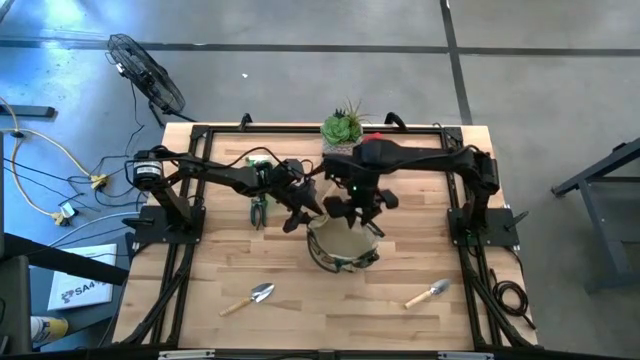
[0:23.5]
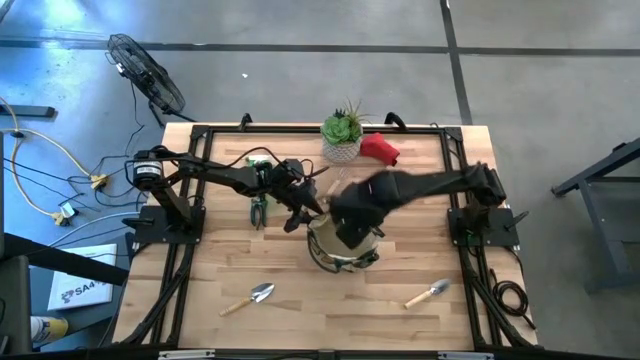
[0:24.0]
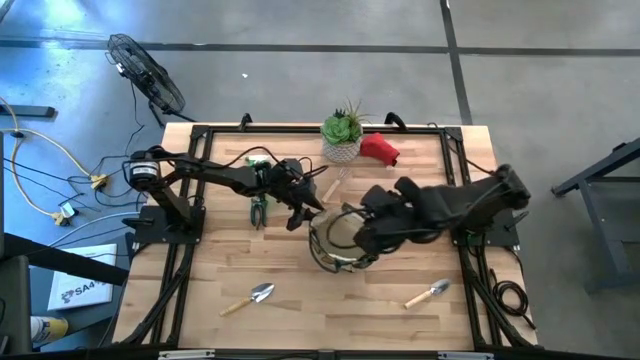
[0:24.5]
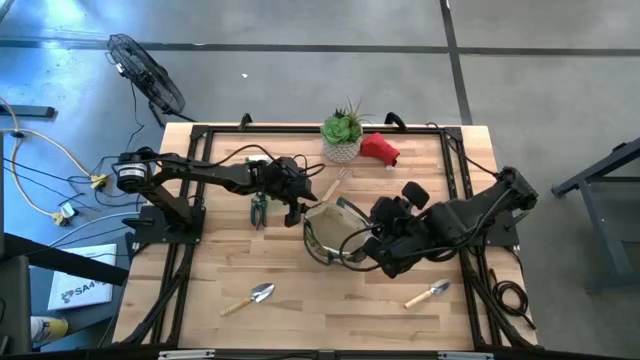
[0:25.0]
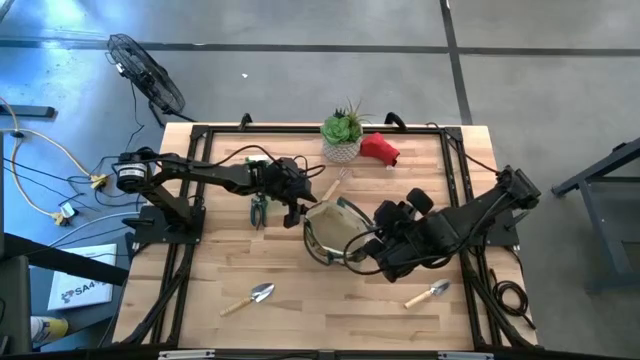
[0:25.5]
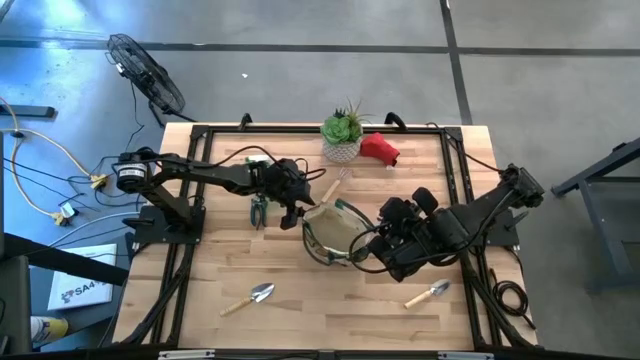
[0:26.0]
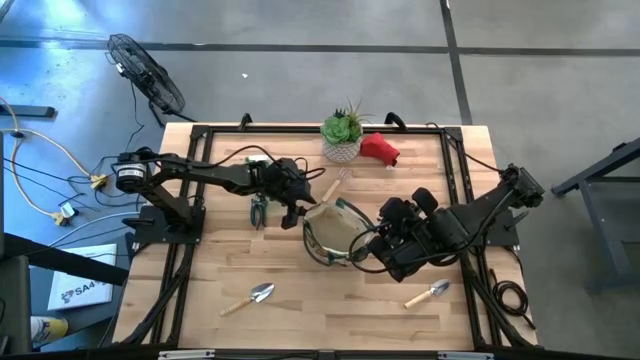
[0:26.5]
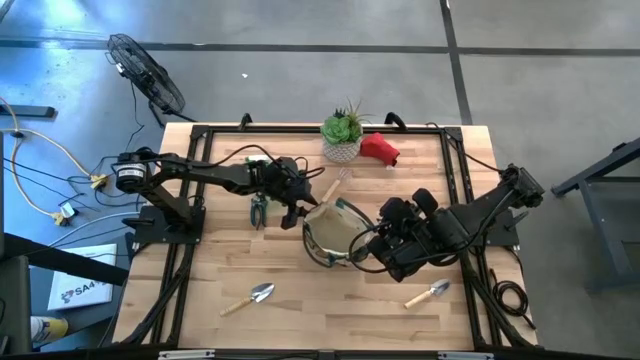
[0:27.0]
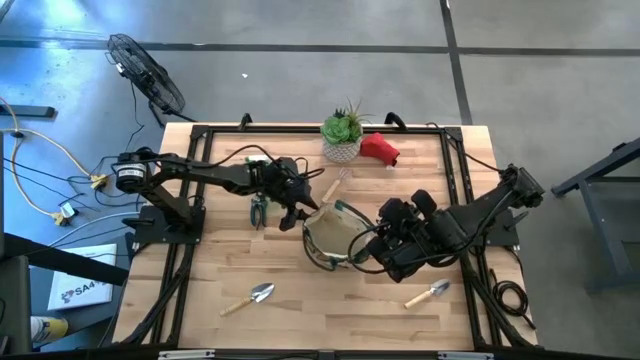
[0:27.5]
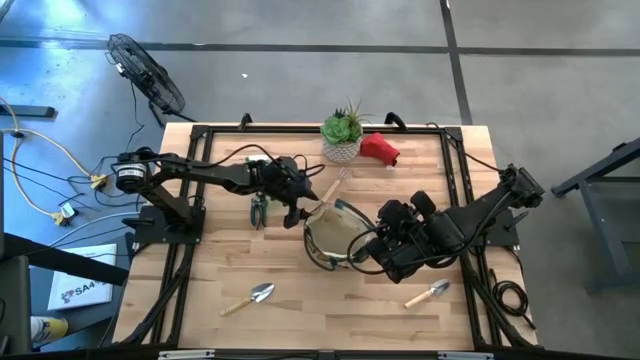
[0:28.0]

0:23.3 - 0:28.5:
Task: Pick & Place Garden tools in Gardening bag
Adjust the gardening bag

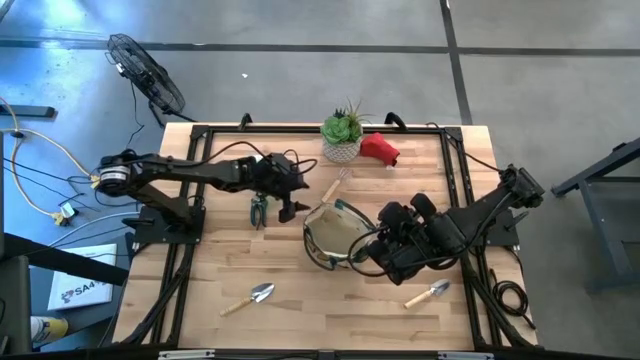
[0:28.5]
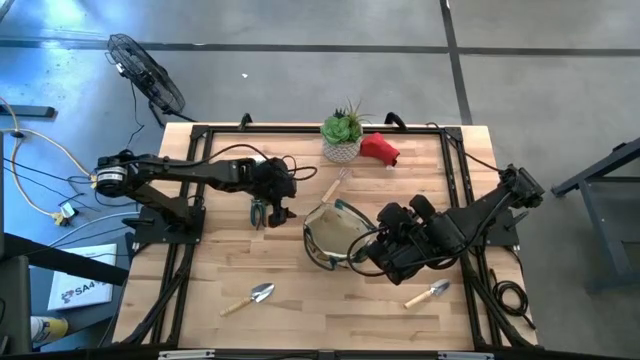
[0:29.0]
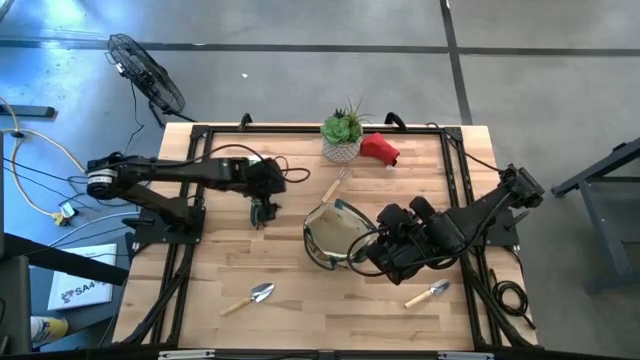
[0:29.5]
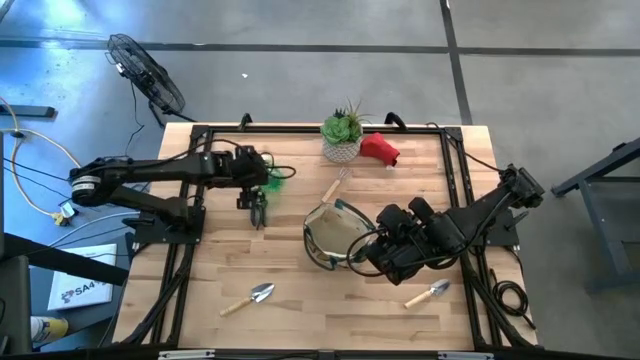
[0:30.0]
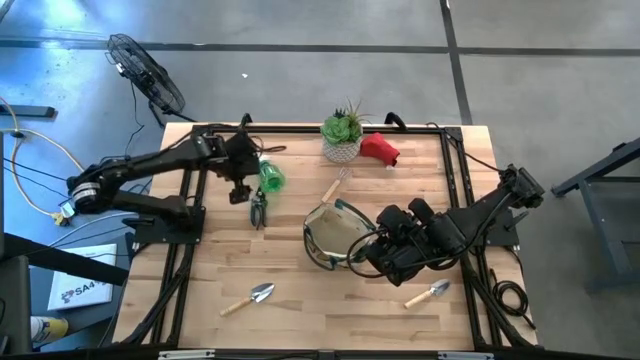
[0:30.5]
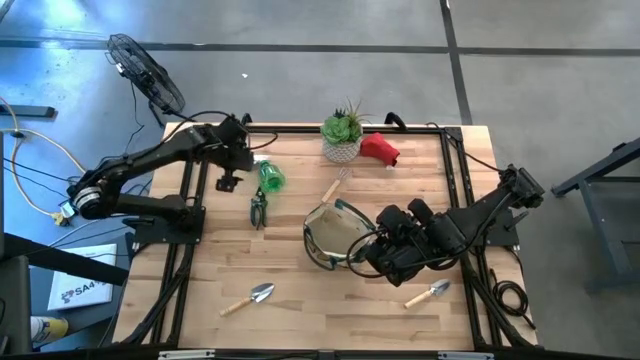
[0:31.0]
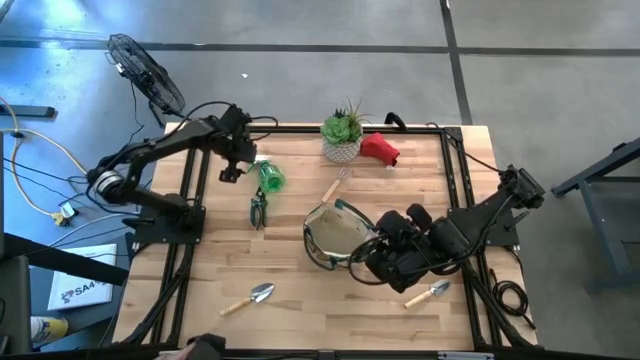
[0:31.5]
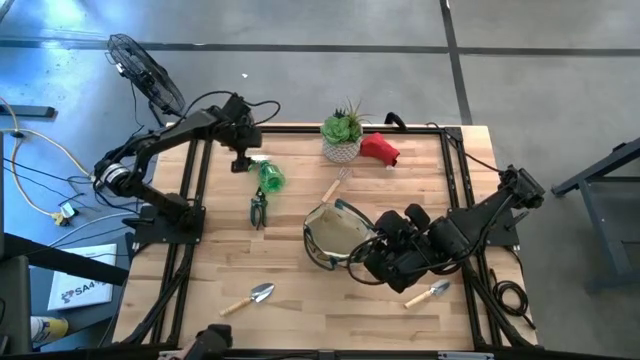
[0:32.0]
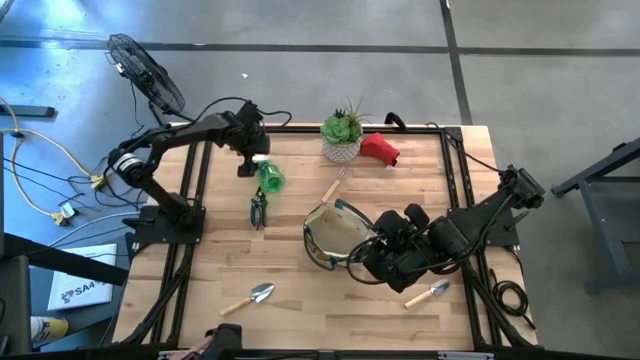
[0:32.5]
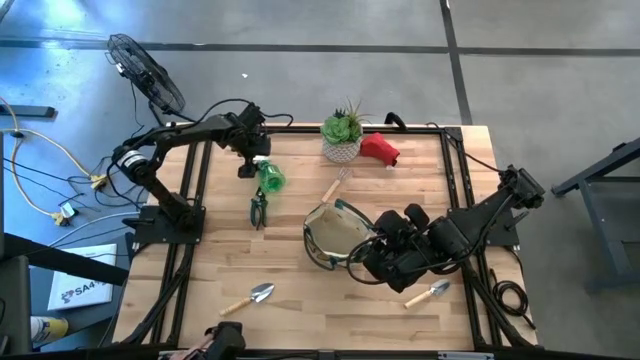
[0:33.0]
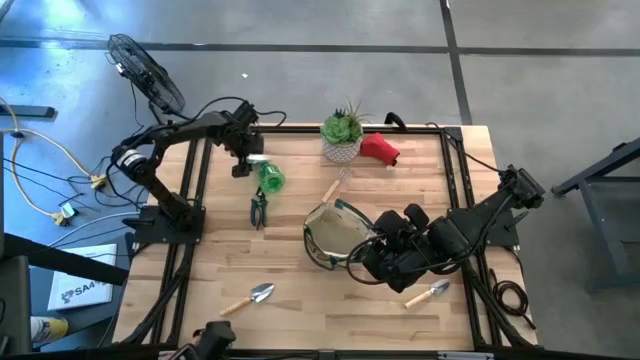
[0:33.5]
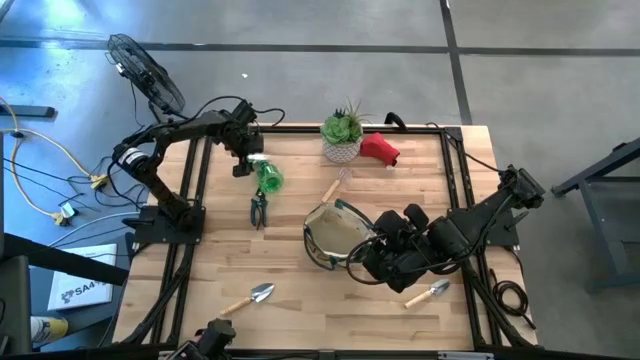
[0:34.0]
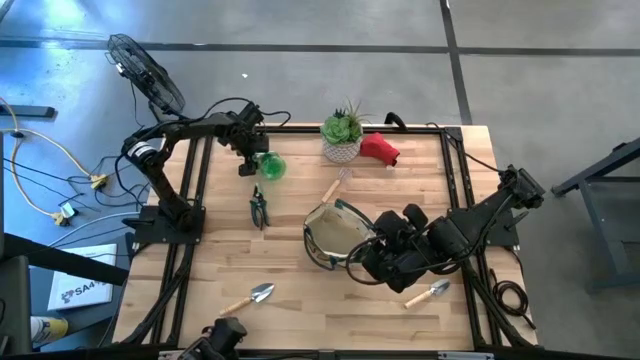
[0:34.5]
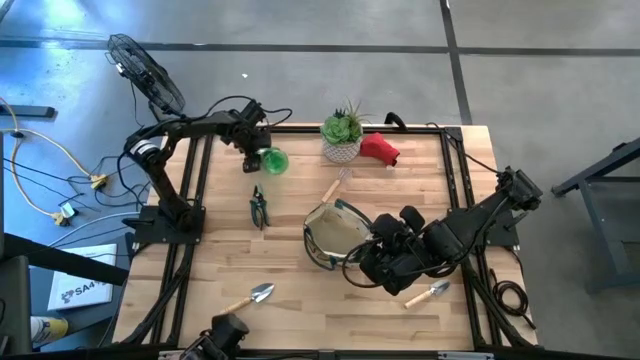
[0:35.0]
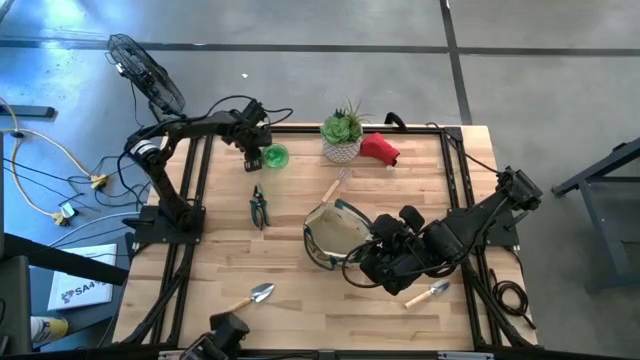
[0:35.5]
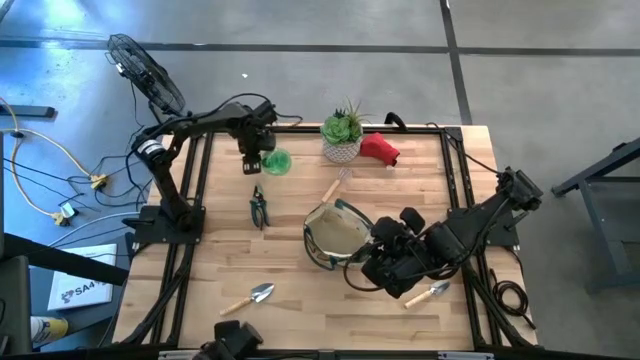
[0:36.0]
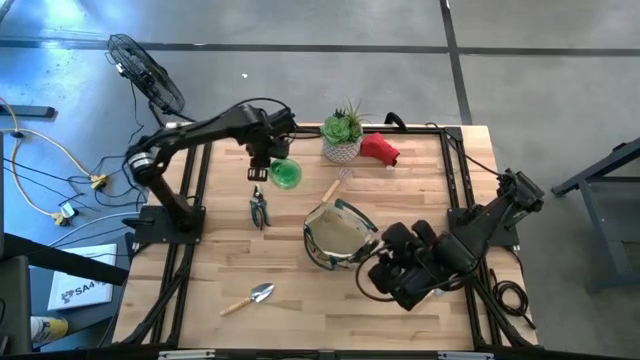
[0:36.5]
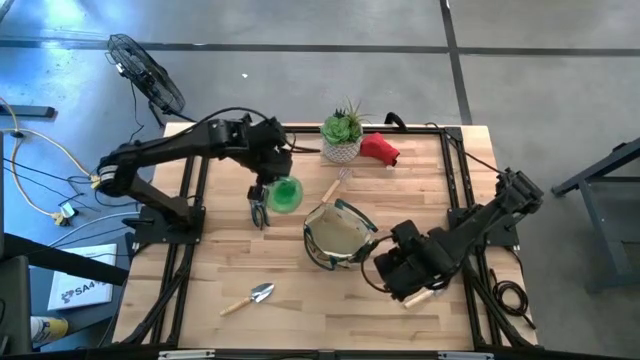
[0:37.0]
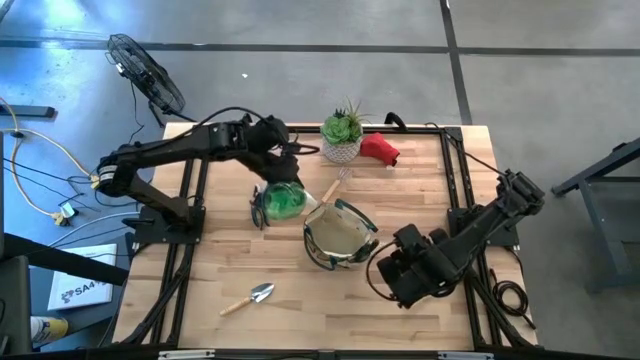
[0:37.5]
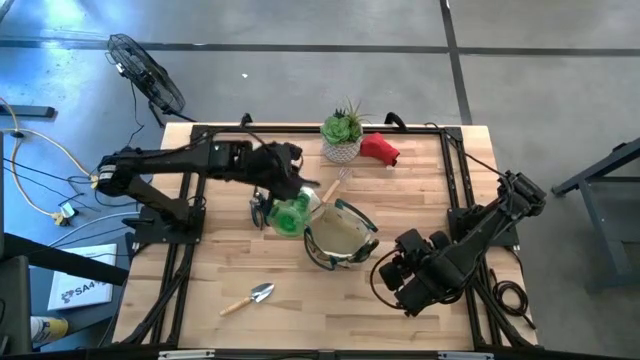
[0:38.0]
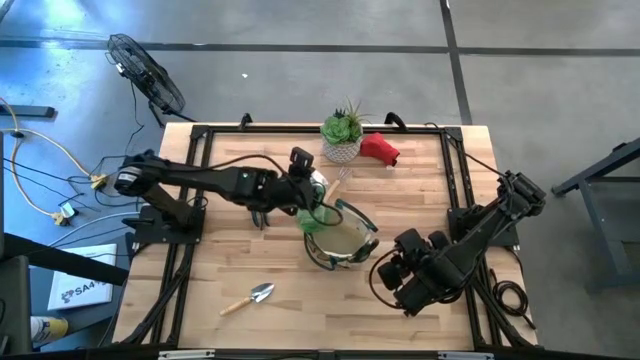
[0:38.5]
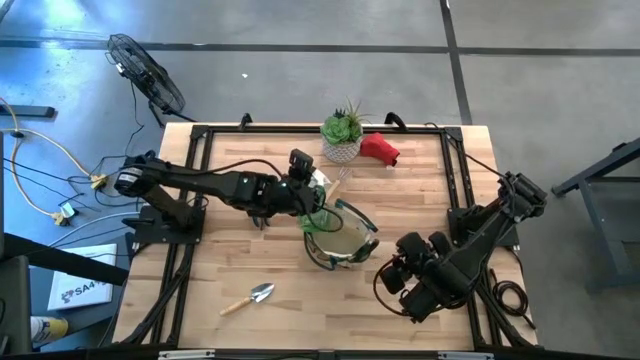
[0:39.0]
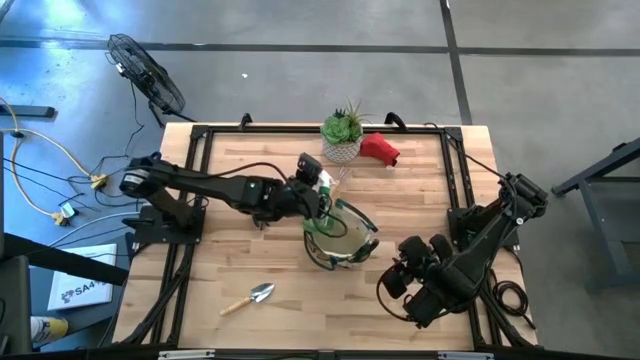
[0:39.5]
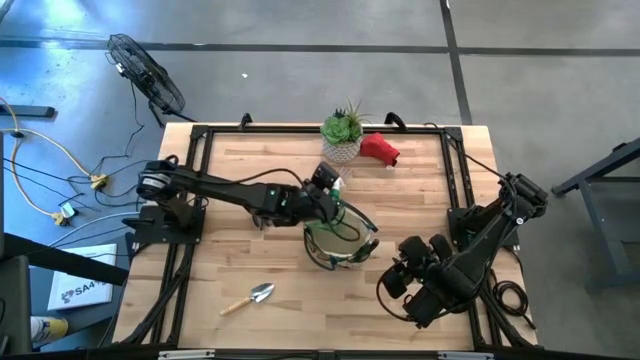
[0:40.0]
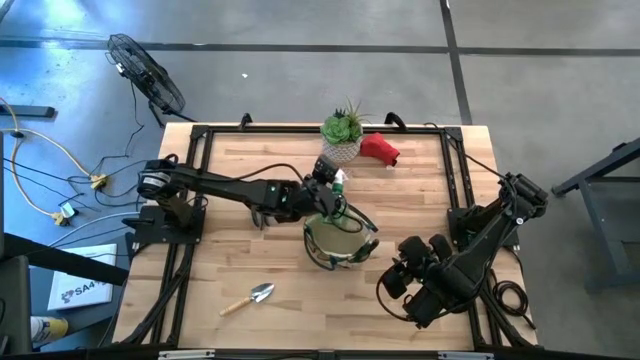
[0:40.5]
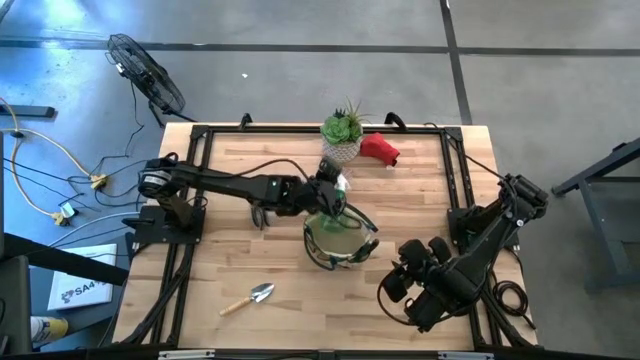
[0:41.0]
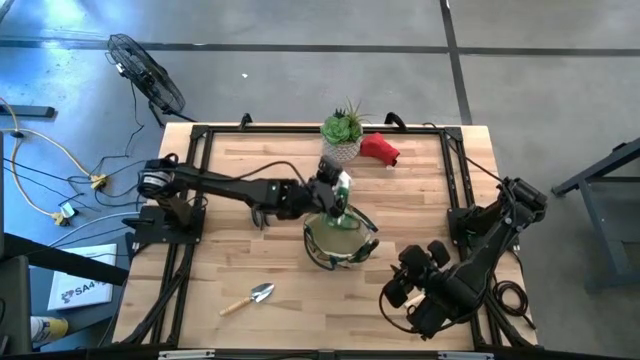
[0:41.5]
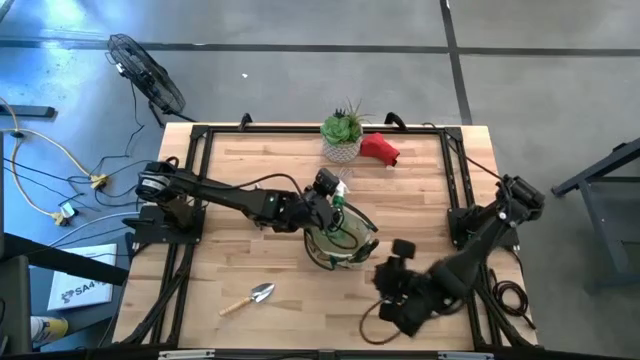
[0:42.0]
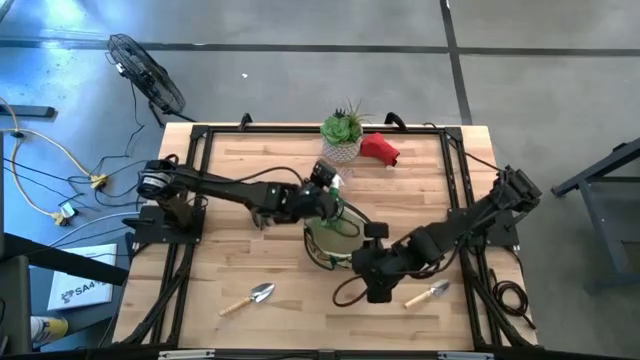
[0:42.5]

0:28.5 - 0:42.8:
Put the green spray bottle into the gardening bag
